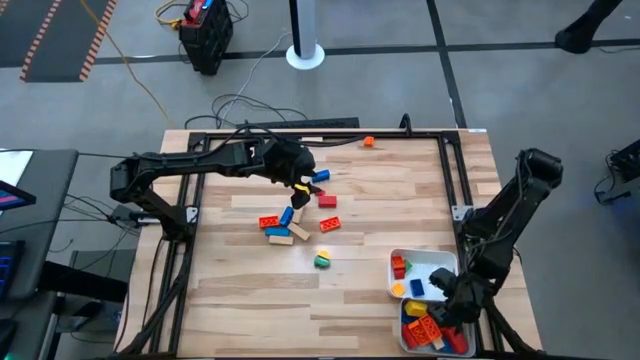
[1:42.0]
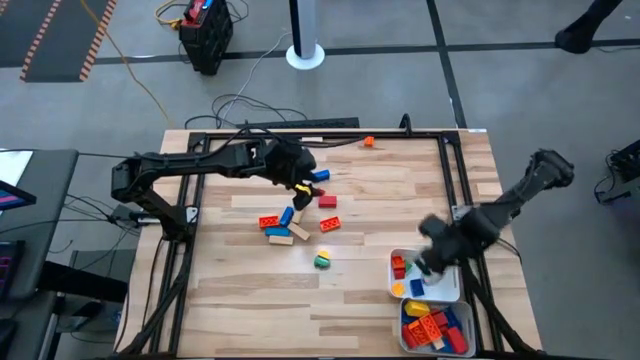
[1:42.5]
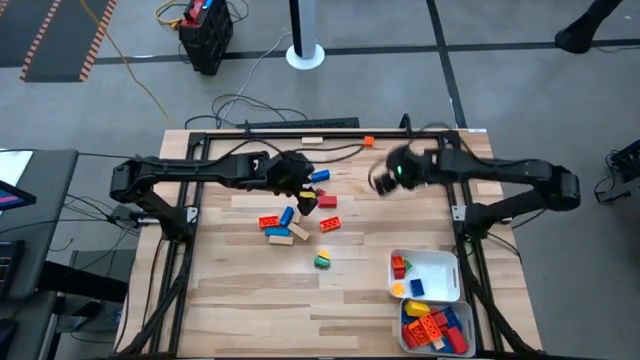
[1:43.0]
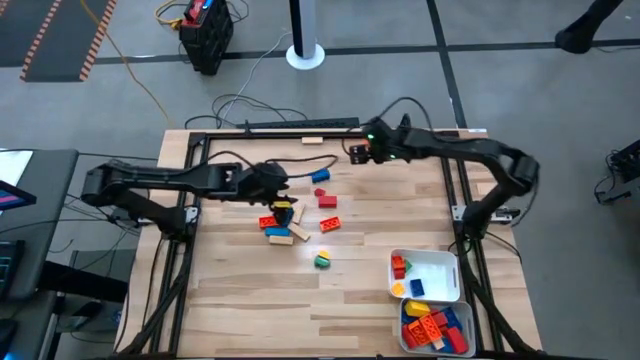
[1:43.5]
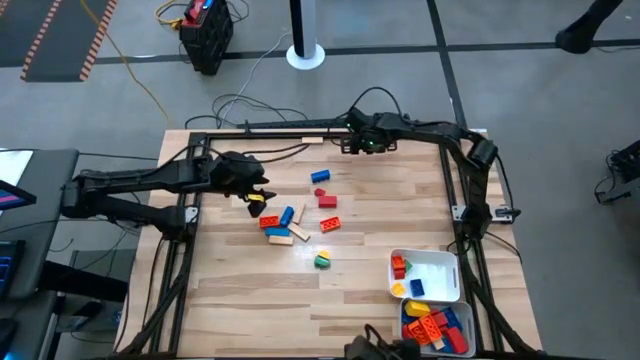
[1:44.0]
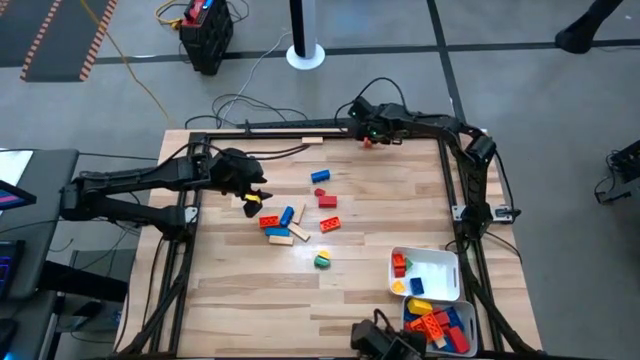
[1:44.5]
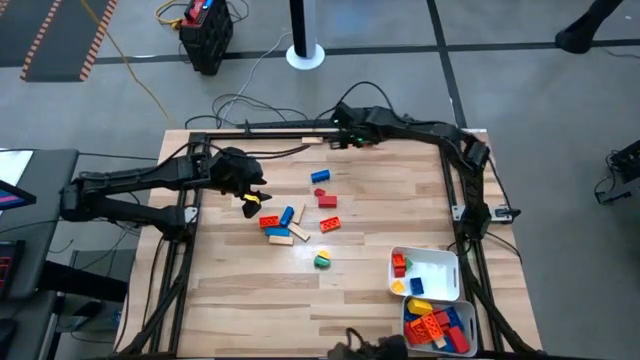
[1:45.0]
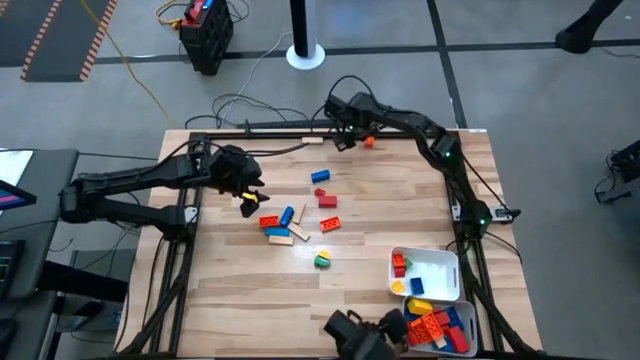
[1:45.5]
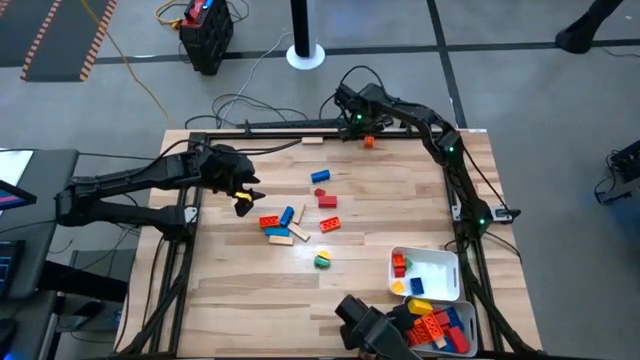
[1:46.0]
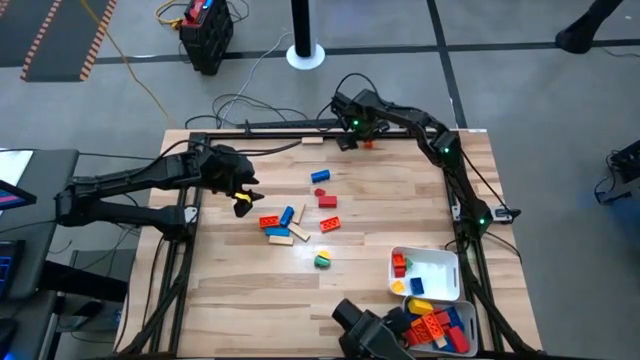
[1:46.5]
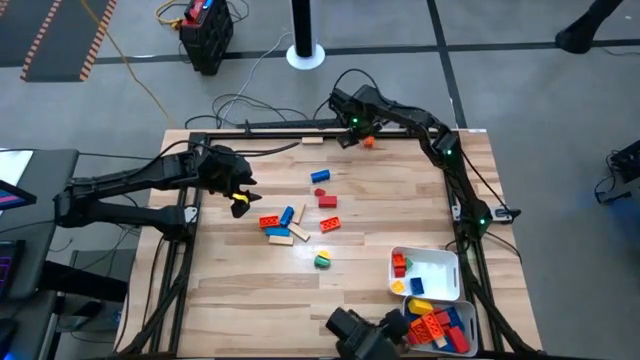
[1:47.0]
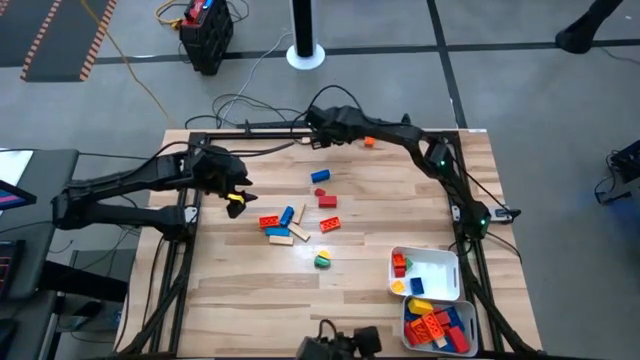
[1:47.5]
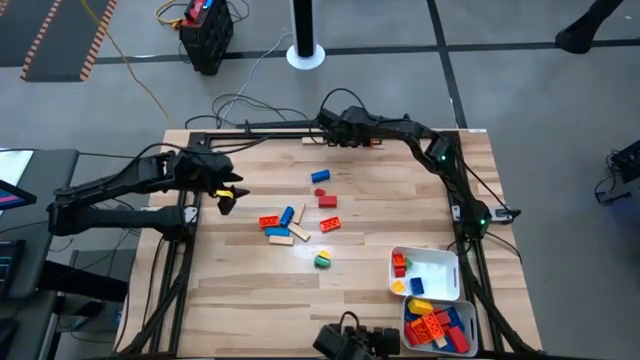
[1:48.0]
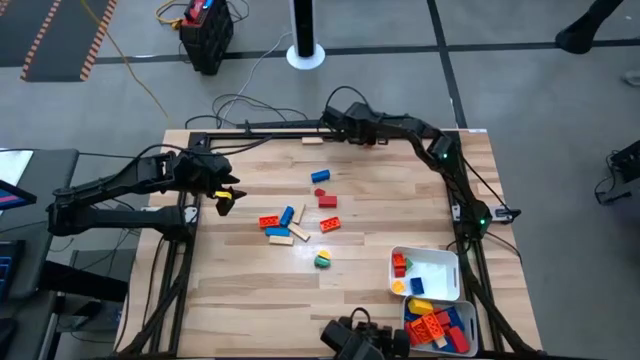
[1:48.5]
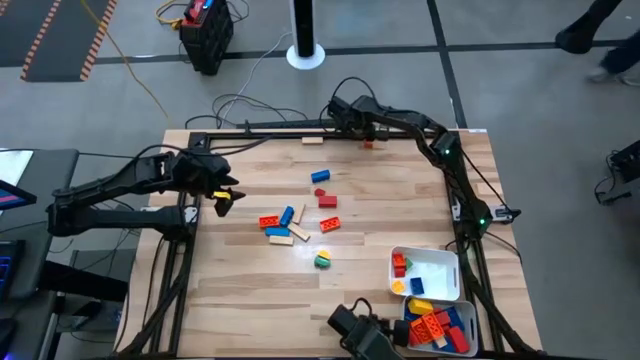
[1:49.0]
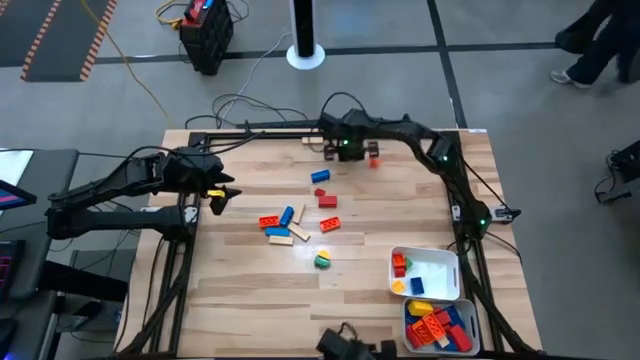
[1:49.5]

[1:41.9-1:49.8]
Task: Sort blocks by size
Put the small orange game piece into the white bin

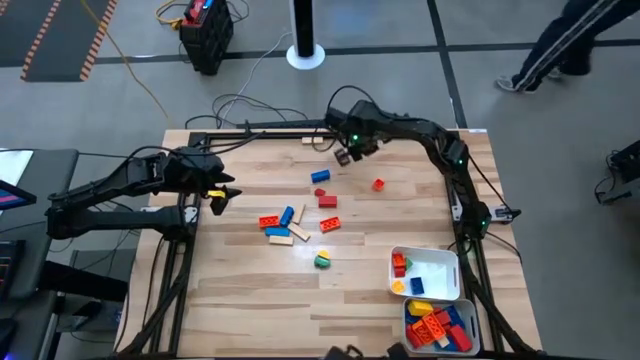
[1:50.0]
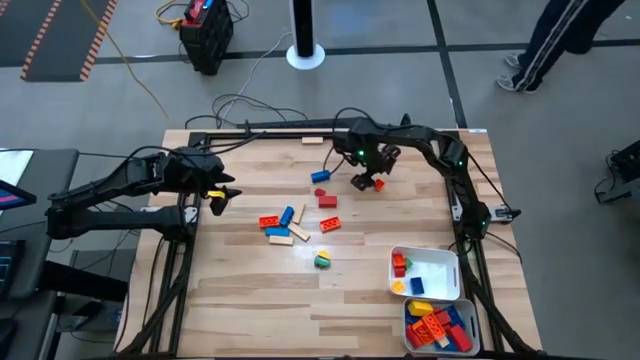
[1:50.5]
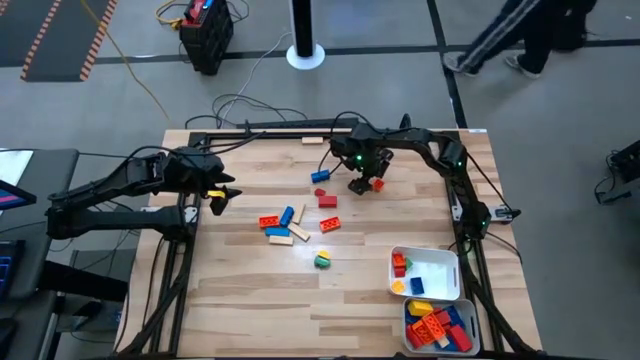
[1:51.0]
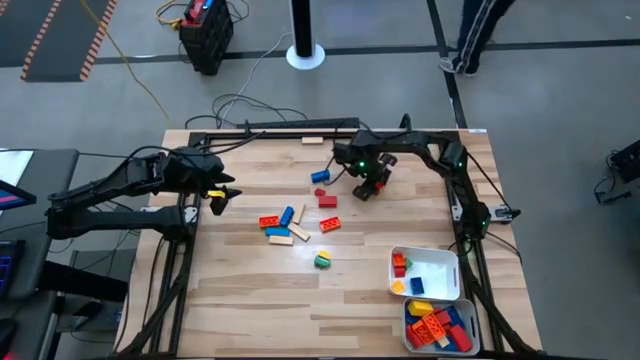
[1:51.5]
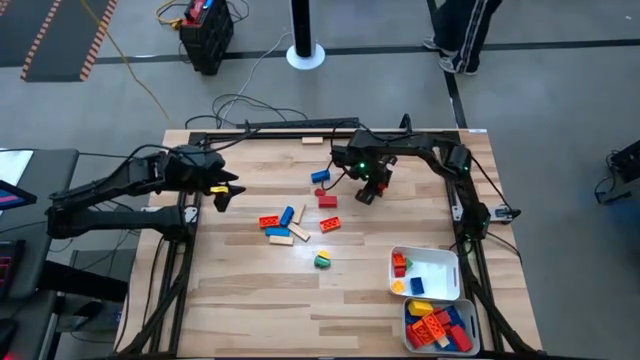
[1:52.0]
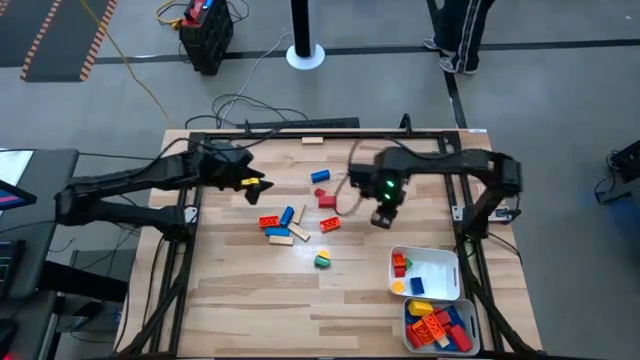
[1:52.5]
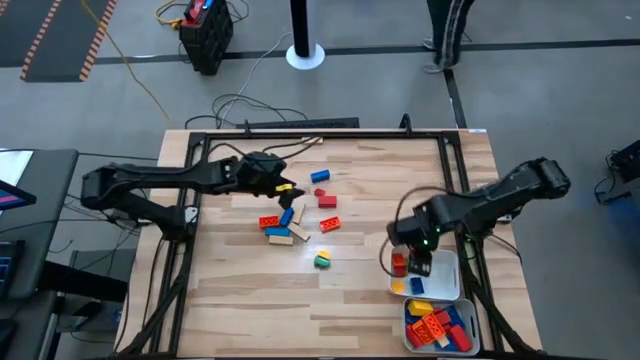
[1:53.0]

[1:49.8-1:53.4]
Put the small orange game piece into the white bin

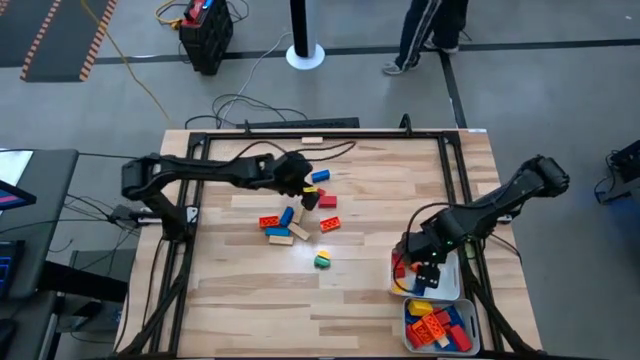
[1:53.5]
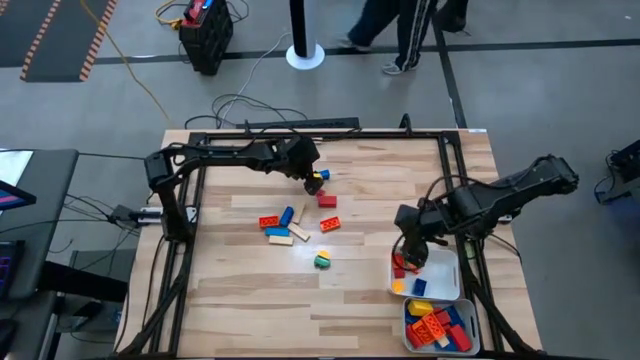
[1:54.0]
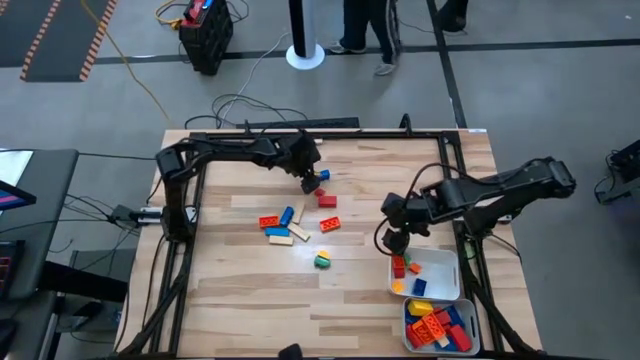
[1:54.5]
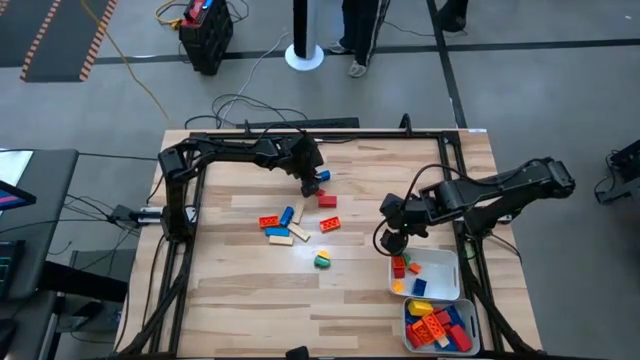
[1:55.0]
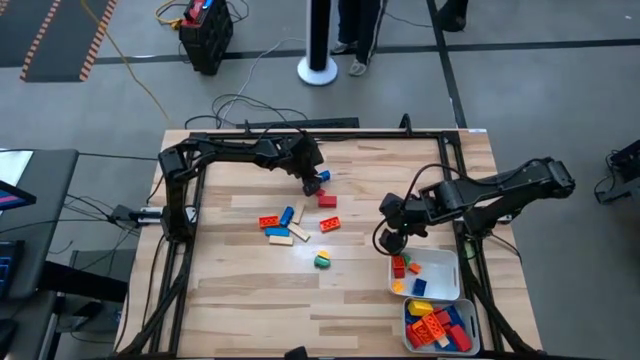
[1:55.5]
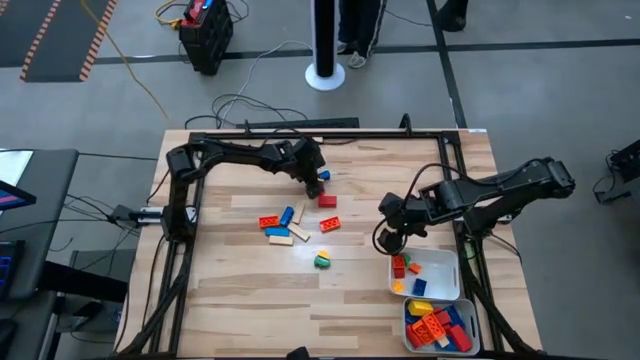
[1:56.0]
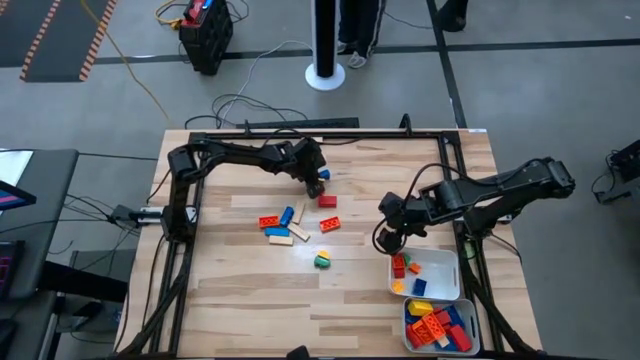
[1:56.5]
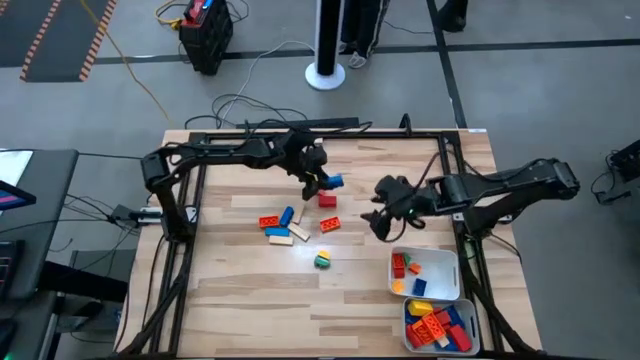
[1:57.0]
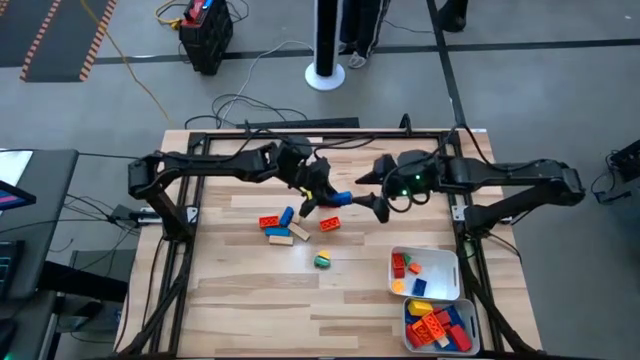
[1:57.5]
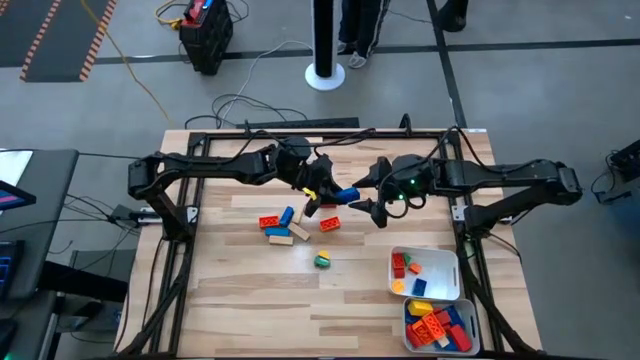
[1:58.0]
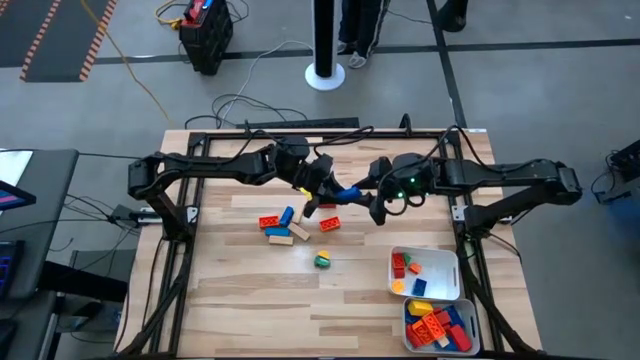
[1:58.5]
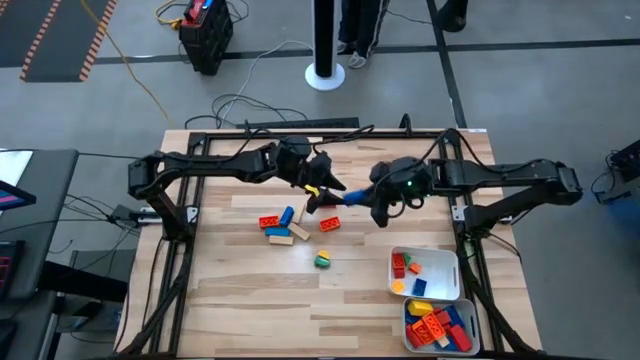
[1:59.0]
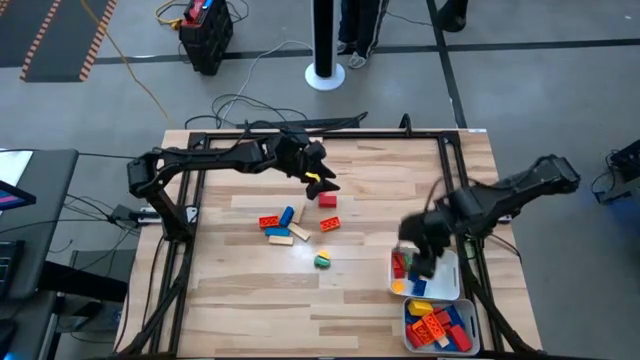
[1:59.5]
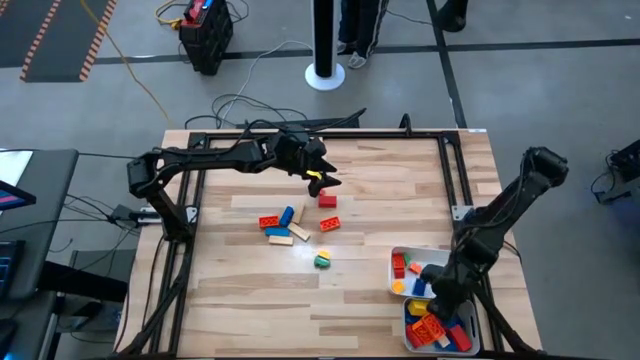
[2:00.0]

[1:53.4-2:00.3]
Put the big blue game piece into the gray bin

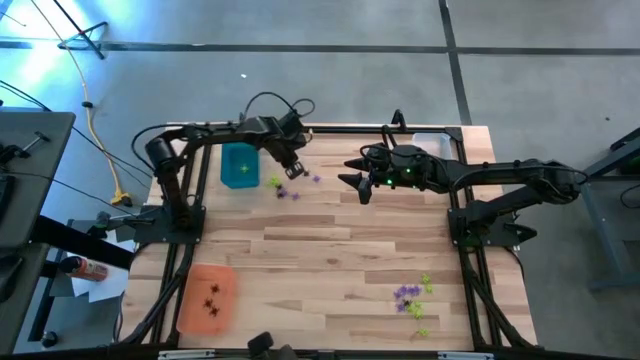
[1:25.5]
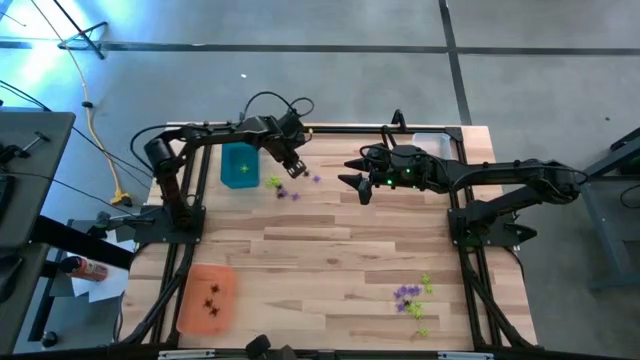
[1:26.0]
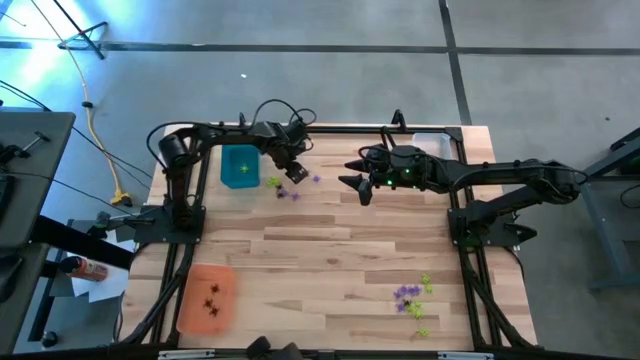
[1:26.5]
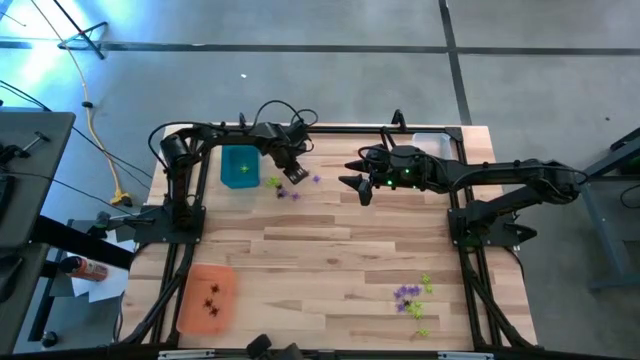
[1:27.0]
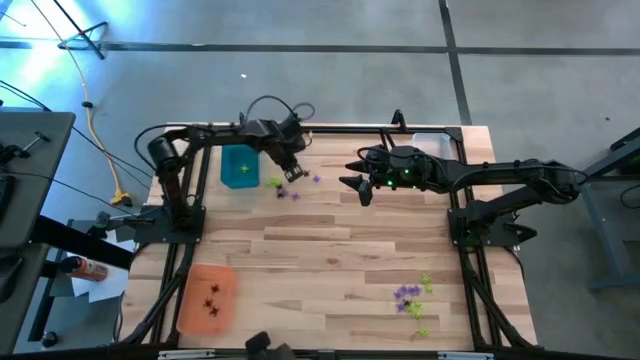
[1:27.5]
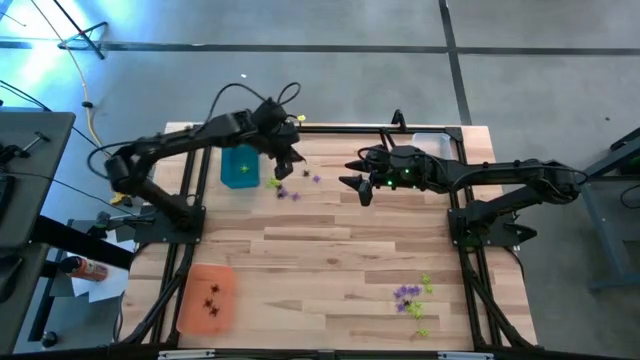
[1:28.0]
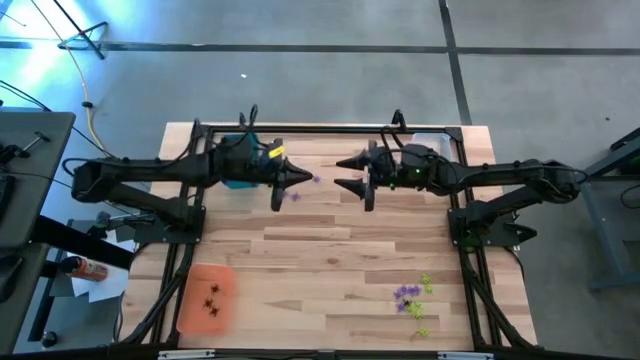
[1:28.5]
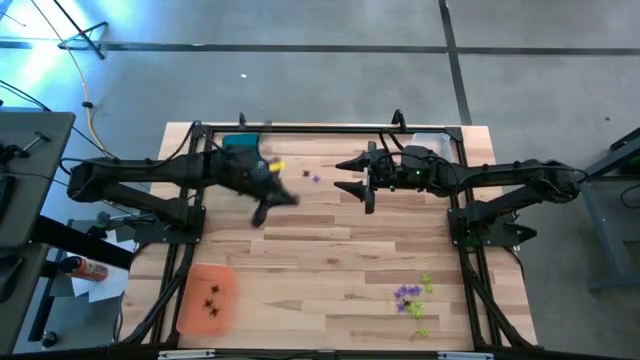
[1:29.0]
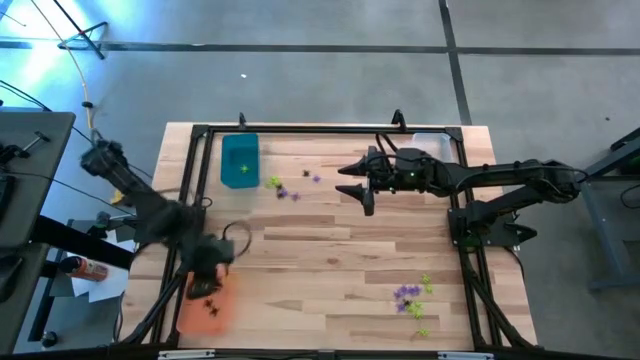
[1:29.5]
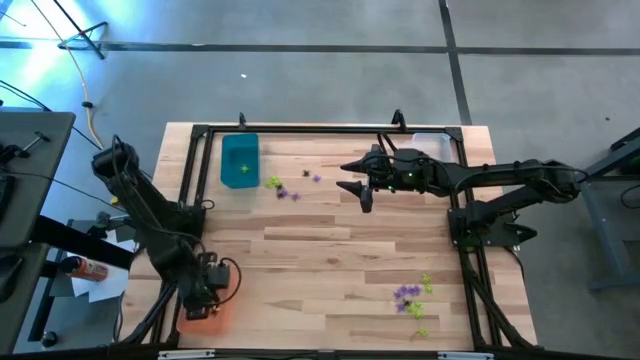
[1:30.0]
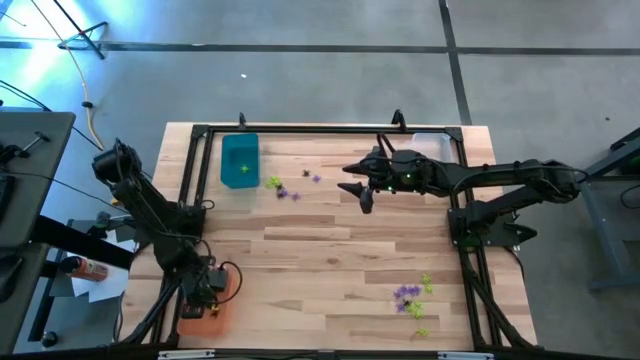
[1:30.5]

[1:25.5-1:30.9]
Task: Sort Halloween decoration
Put the black spider toy into the orange bin
